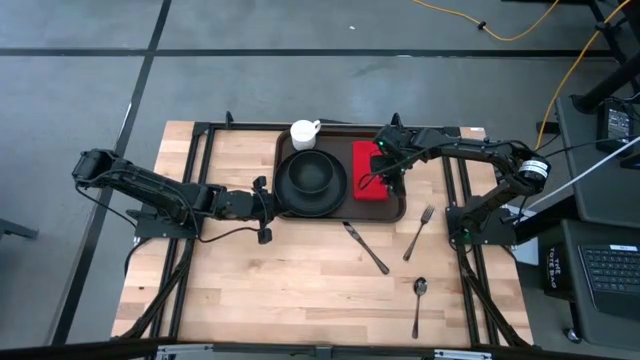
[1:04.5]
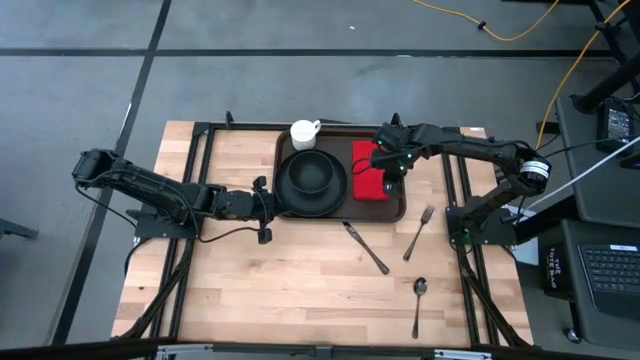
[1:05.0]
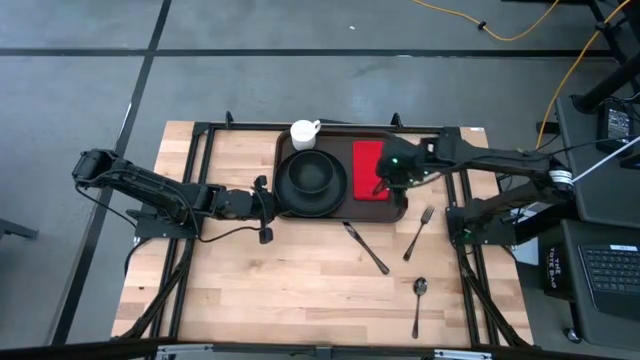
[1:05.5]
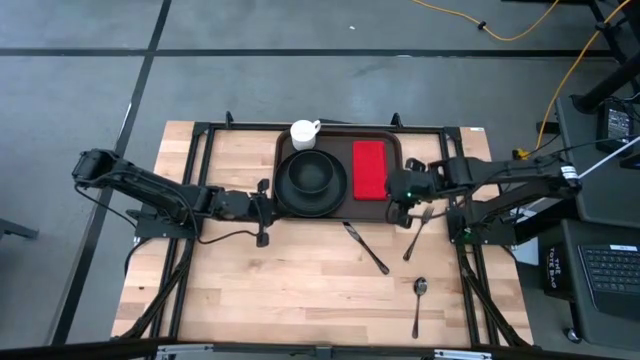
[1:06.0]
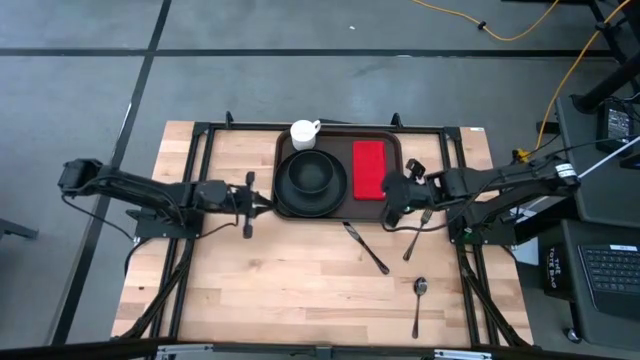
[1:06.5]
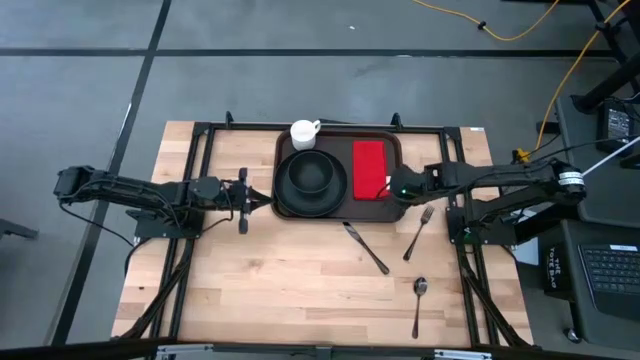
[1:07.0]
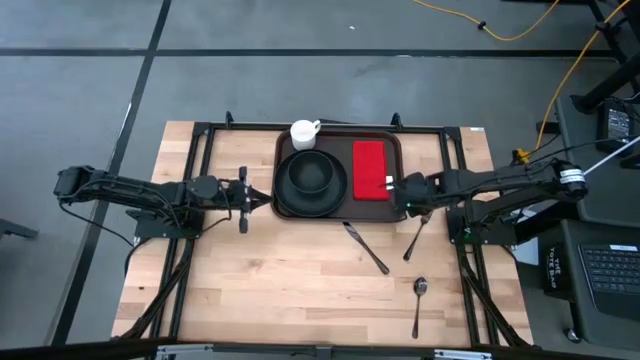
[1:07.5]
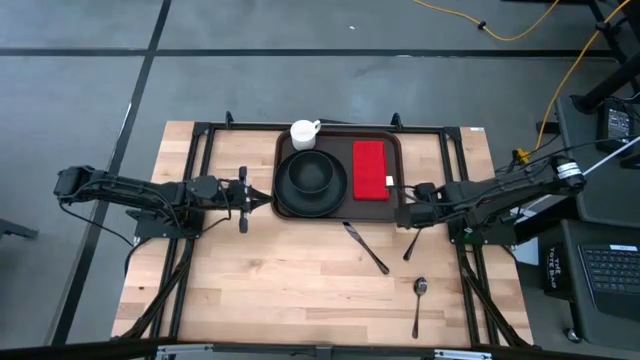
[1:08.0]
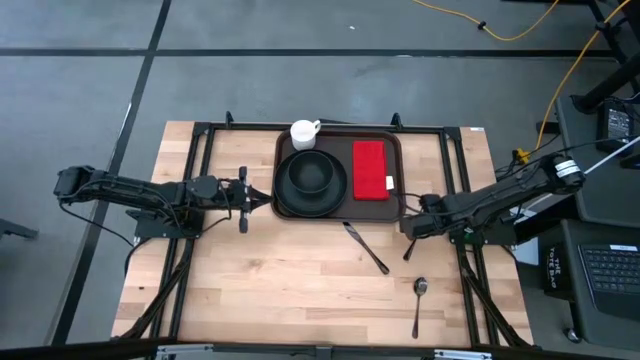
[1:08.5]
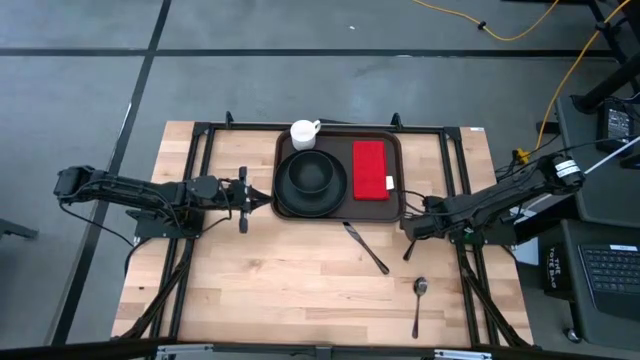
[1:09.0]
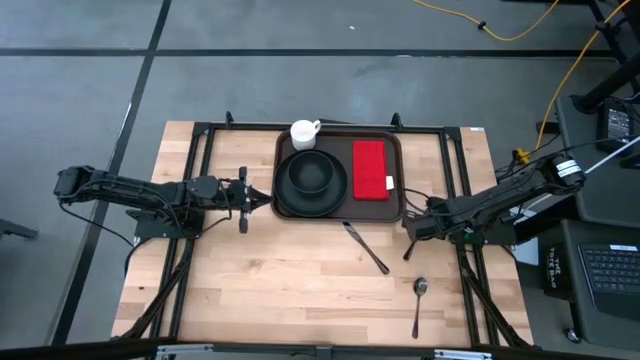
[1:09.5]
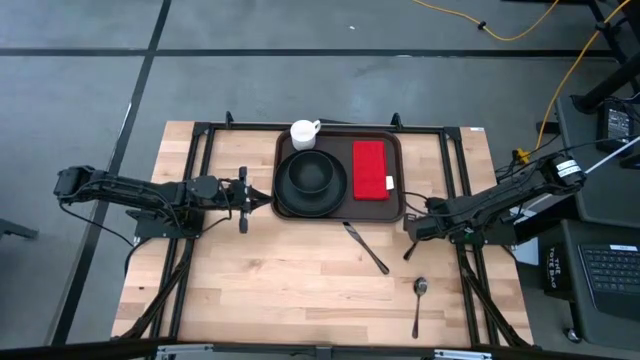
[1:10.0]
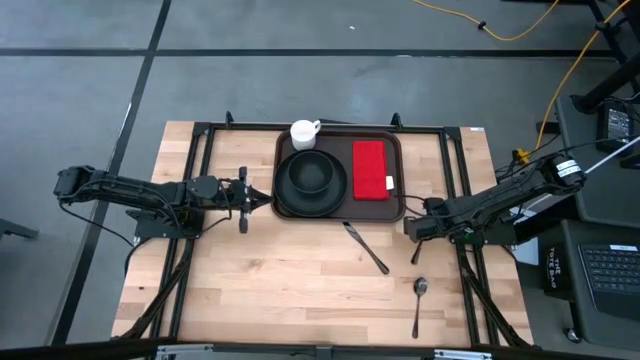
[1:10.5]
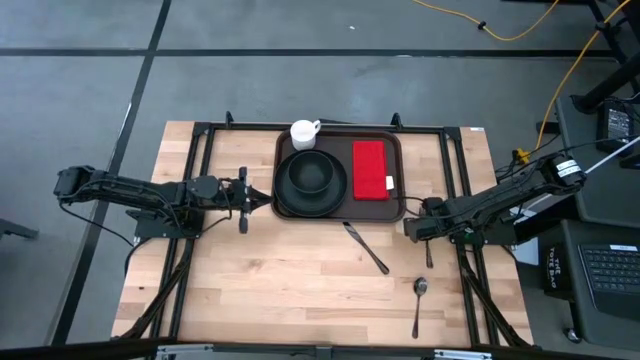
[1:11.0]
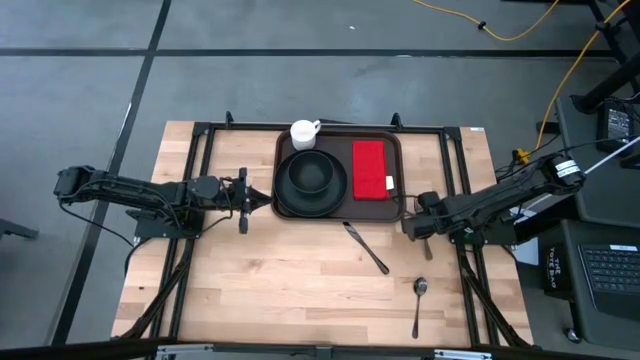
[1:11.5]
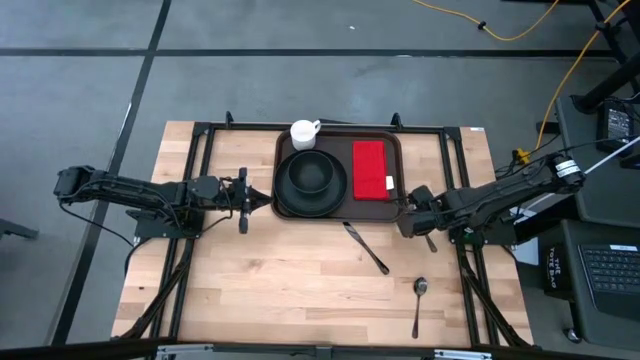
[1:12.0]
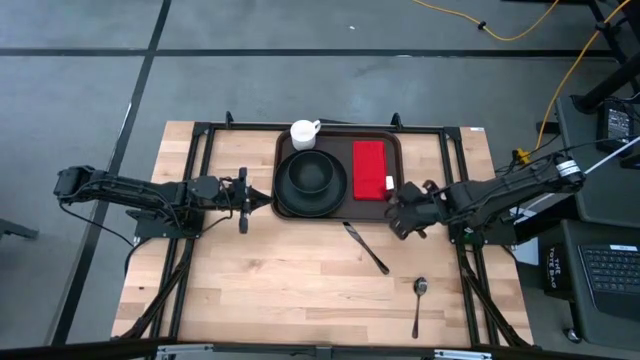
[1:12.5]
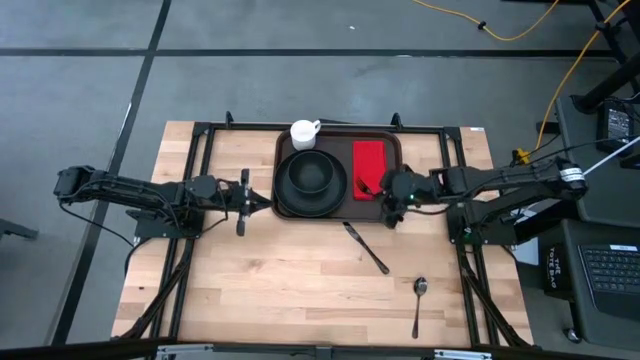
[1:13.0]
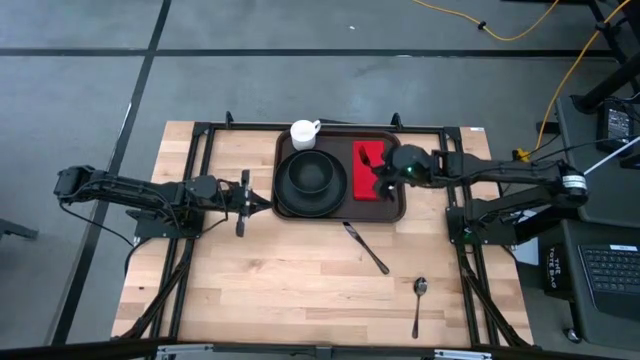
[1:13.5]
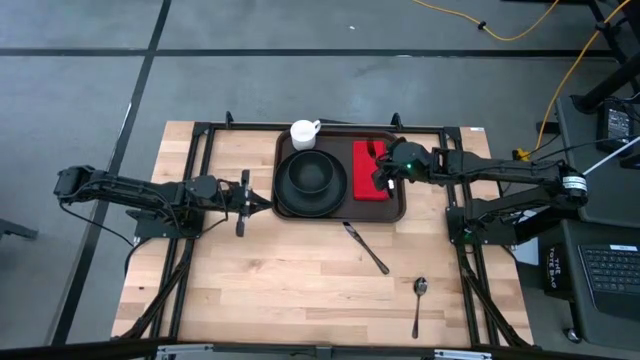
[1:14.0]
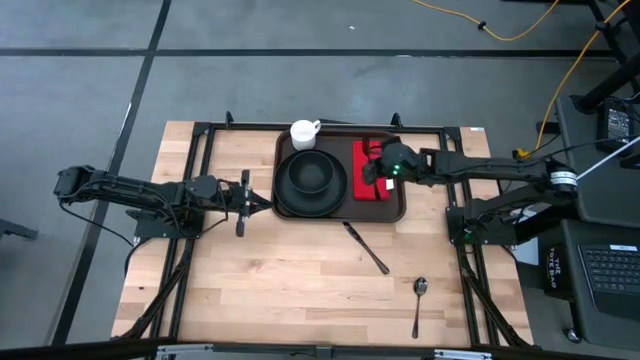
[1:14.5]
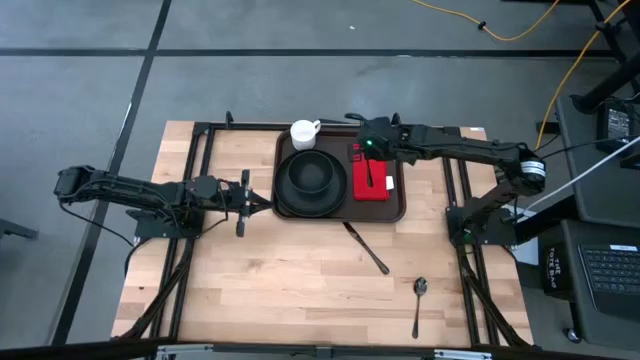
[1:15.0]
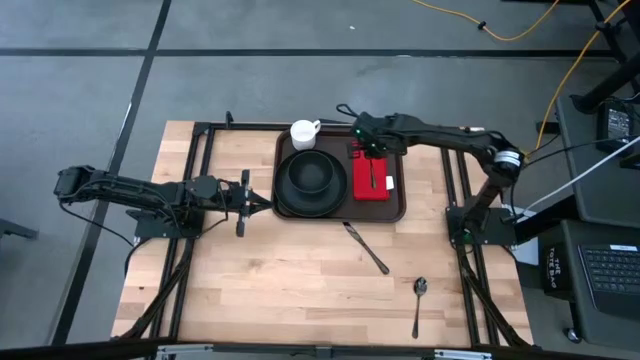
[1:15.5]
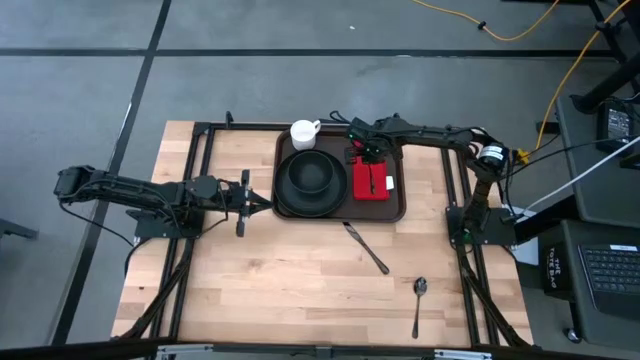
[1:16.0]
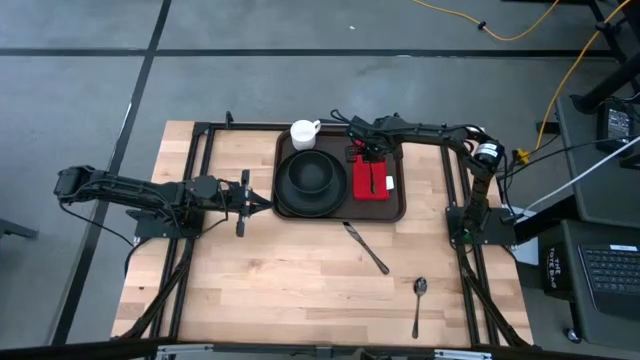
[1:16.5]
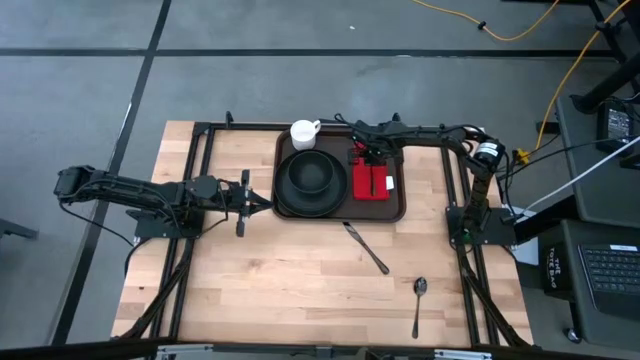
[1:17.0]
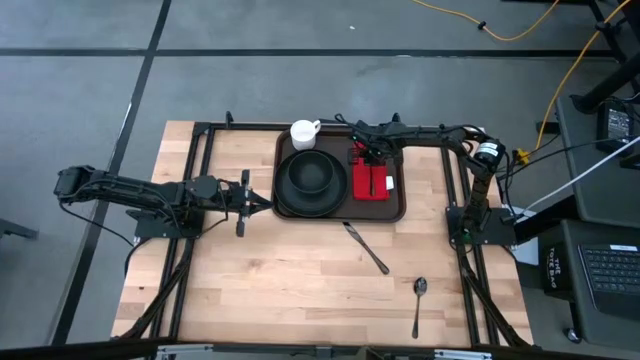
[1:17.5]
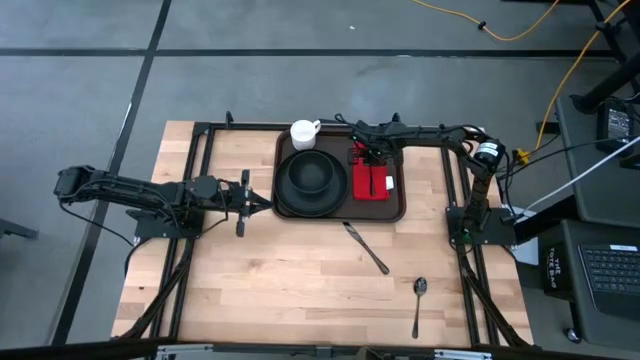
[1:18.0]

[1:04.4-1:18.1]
Task: Set up tray
Put the black fork on top of the red napkin

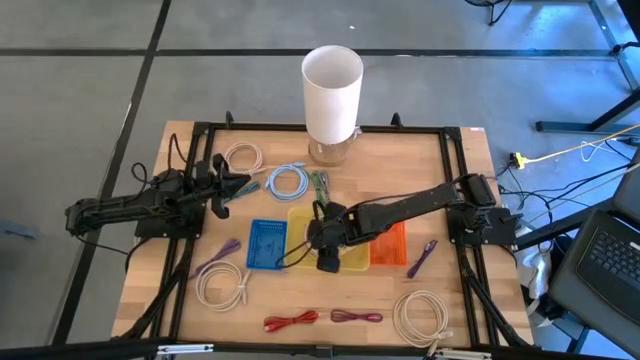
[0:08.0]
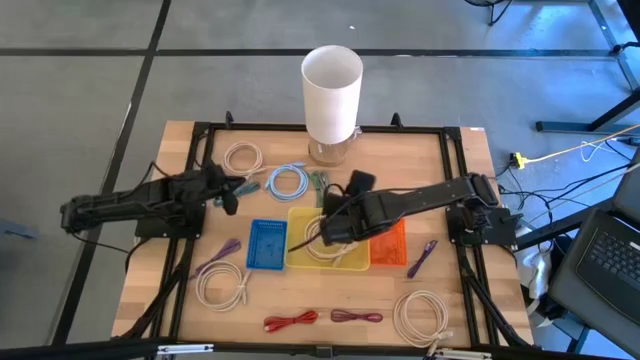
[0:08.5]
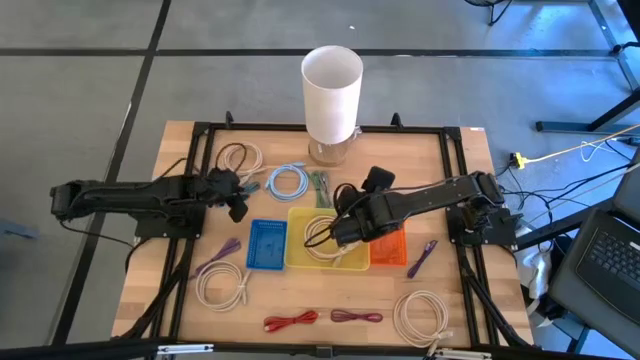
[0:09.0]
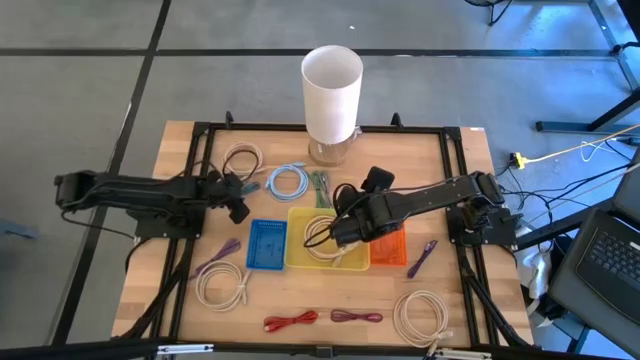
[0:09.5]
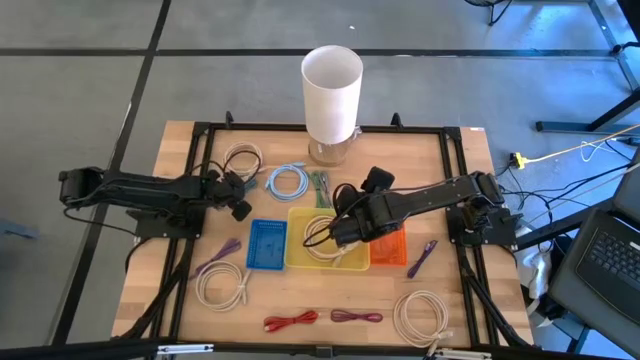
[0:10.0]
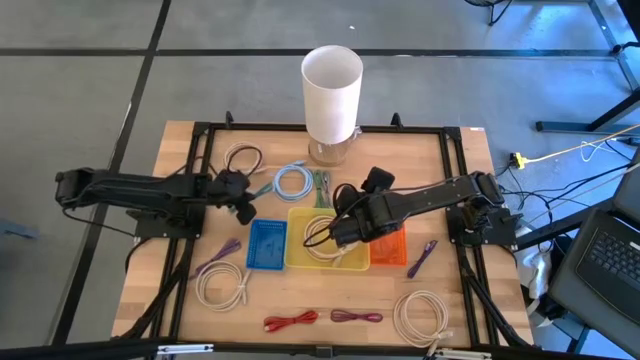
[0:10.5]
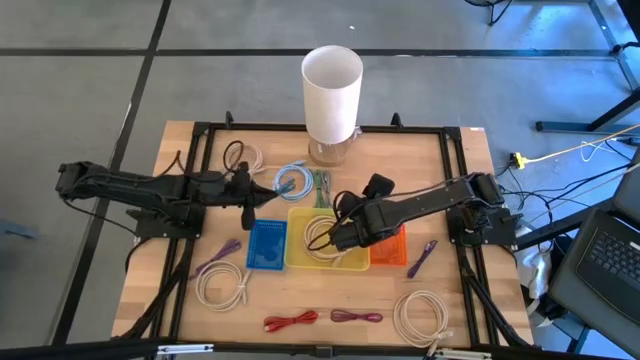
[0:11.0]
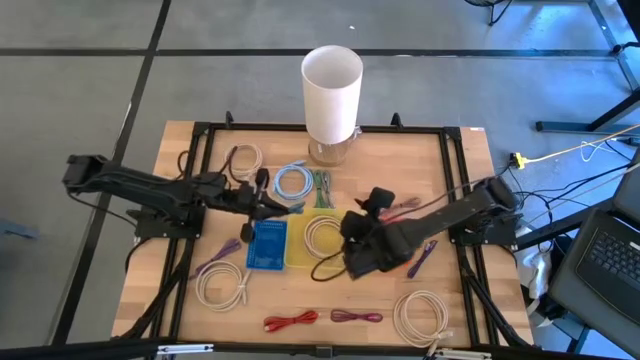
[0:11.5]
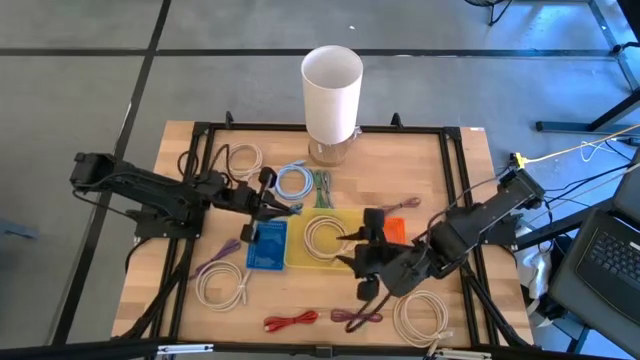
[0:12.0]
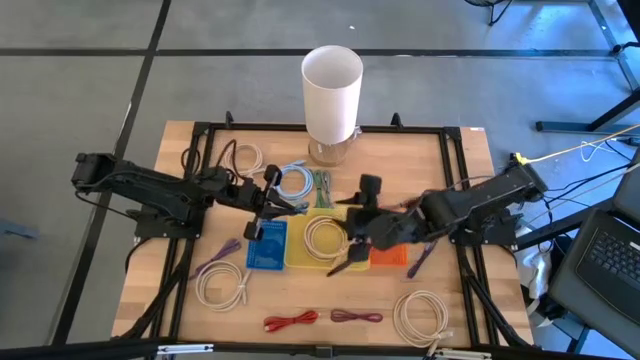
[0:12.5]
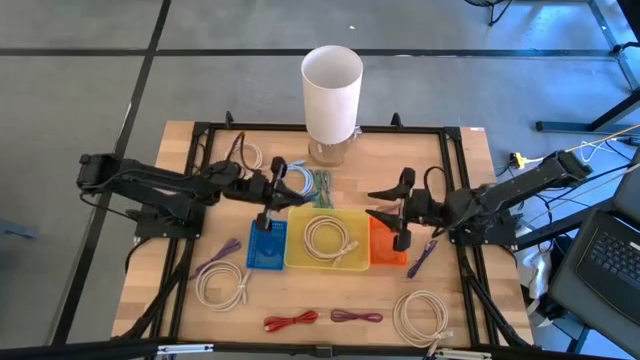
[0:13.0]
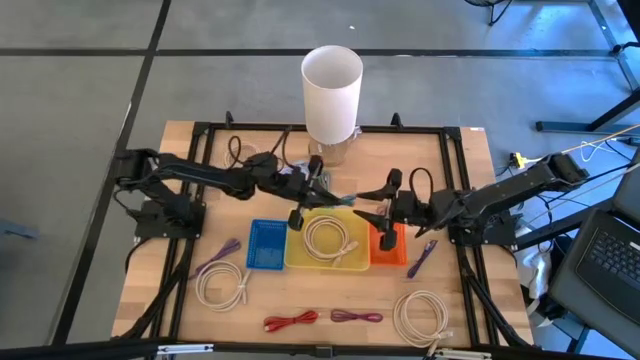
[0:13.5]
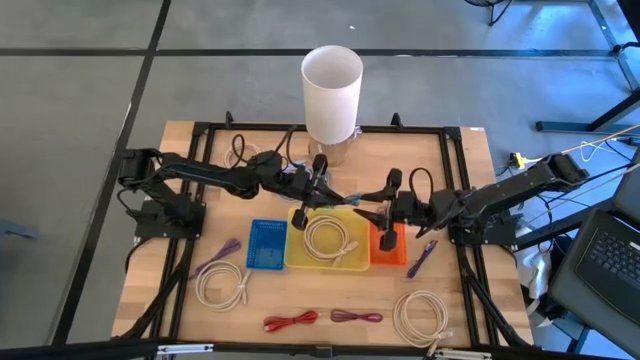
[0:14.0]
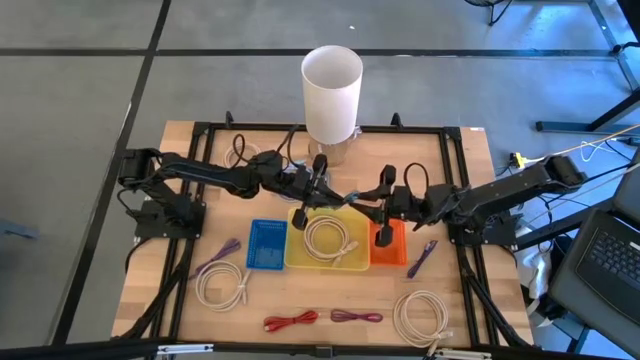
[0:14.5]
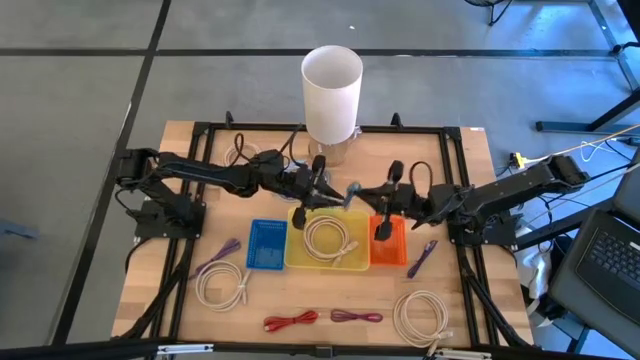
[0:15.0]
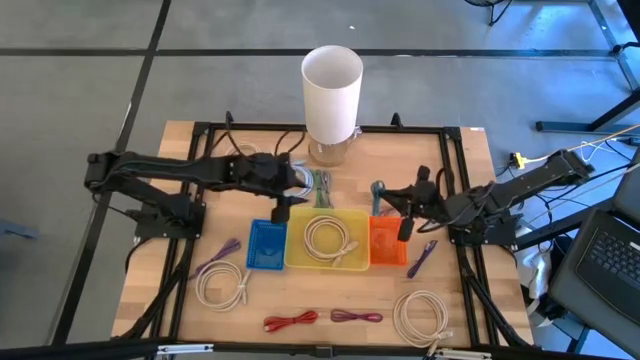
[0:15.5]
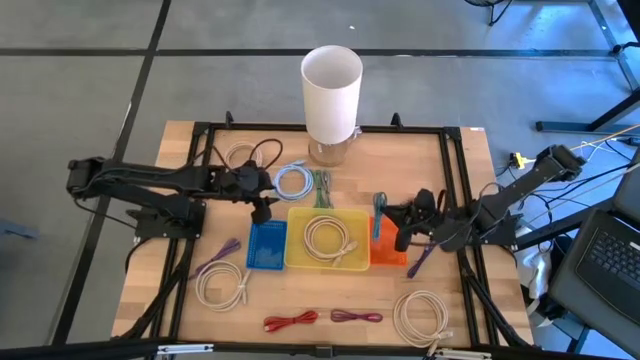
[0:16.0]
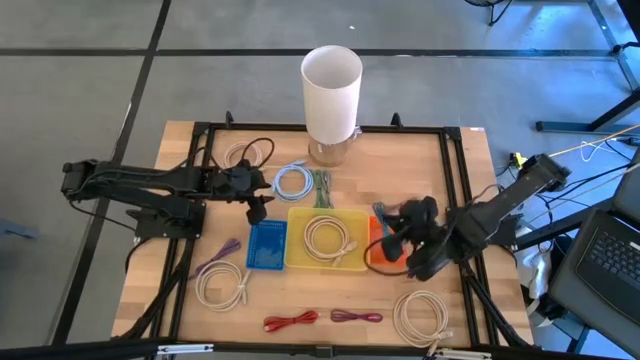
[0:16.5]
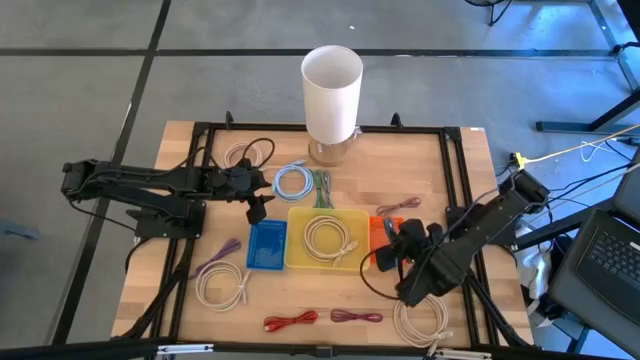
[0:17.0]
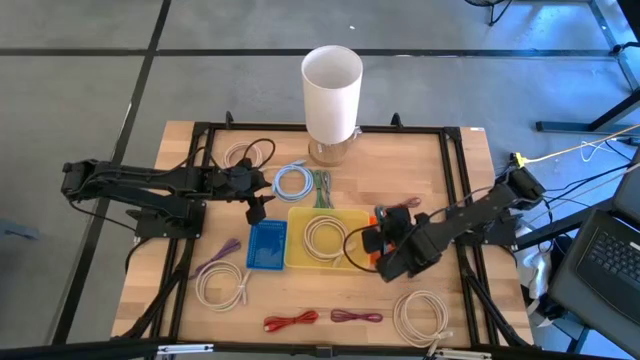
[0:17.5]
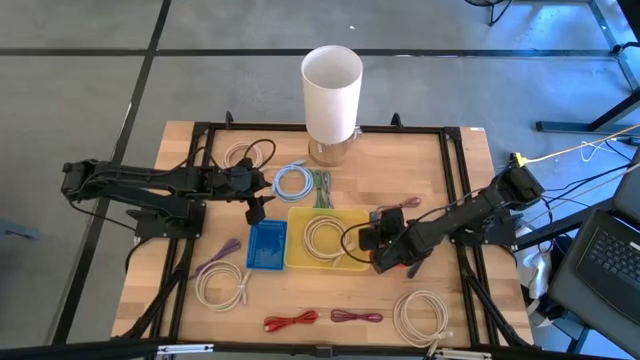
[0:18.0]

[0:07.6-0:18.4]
Task: Pick & Place USB Port
Put the blue and black charger cable into the orange bin
